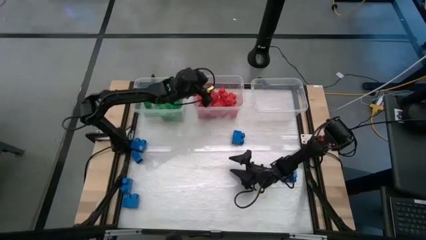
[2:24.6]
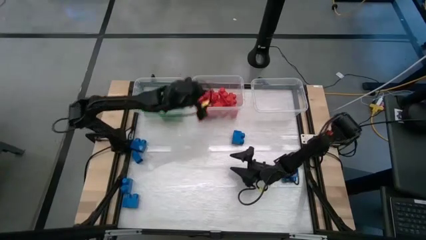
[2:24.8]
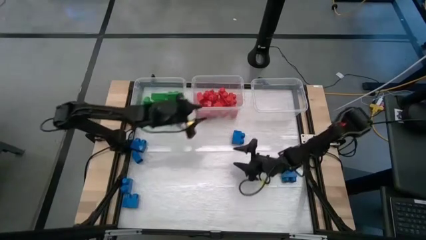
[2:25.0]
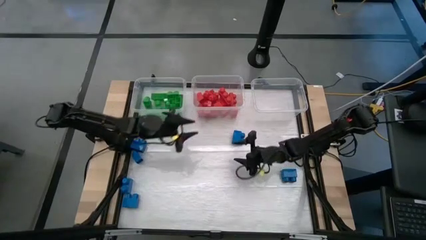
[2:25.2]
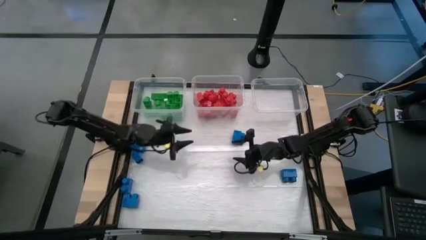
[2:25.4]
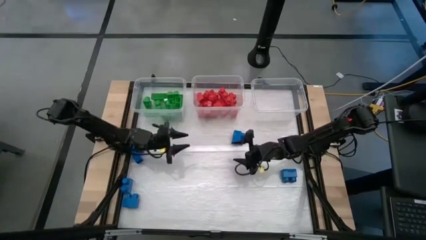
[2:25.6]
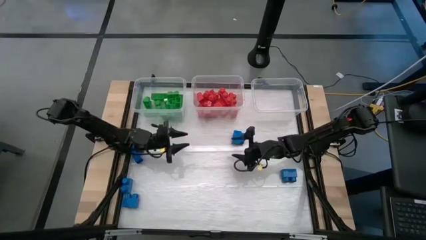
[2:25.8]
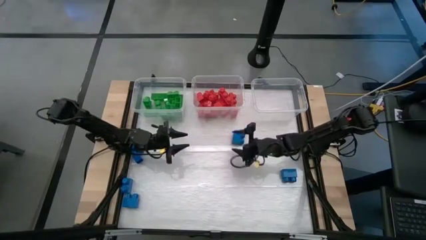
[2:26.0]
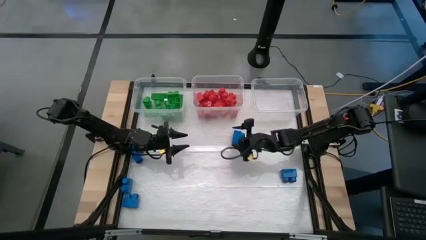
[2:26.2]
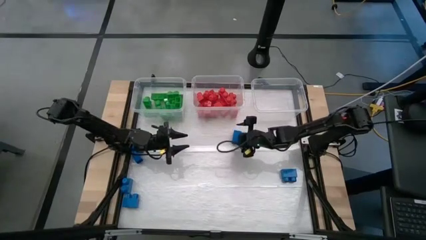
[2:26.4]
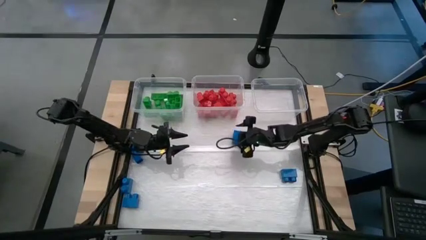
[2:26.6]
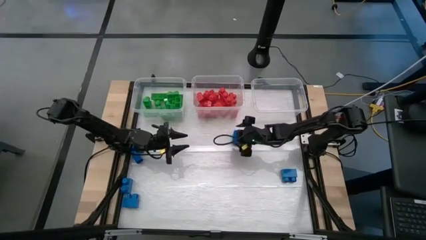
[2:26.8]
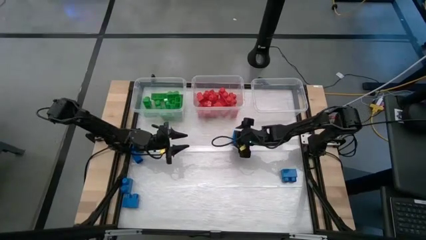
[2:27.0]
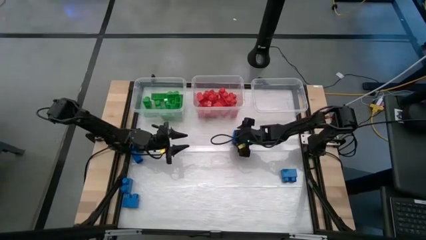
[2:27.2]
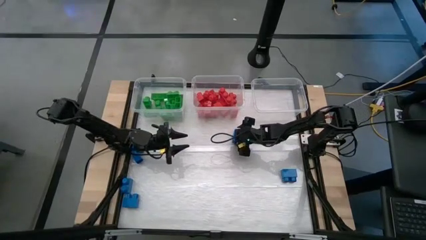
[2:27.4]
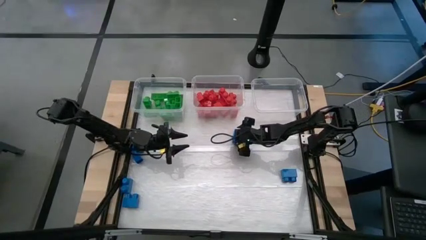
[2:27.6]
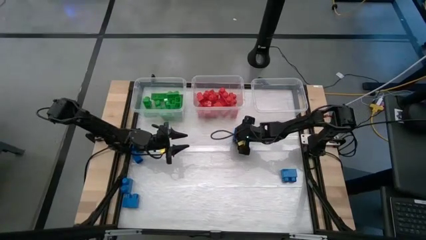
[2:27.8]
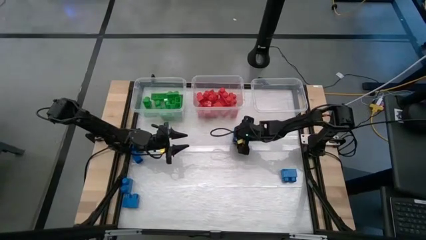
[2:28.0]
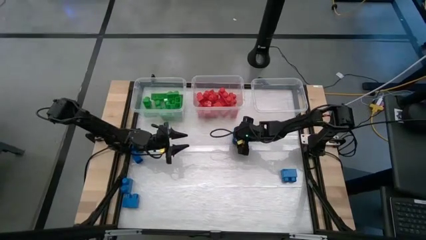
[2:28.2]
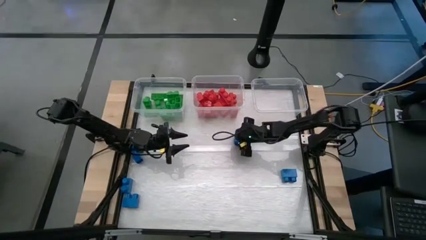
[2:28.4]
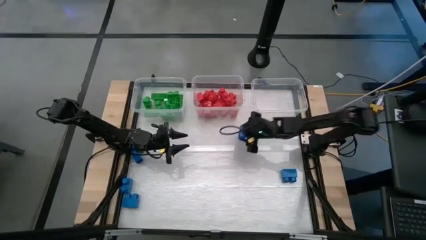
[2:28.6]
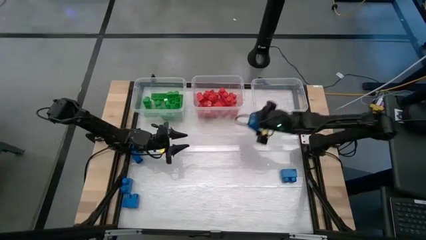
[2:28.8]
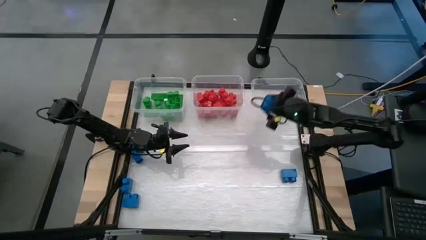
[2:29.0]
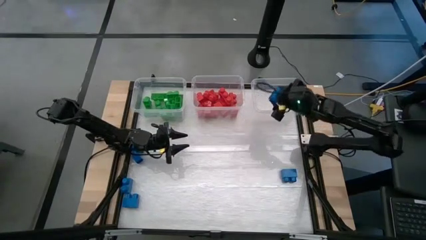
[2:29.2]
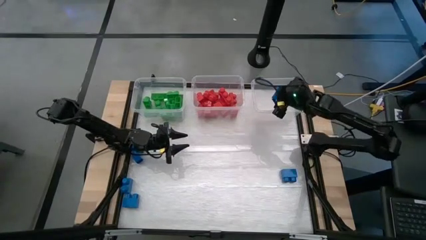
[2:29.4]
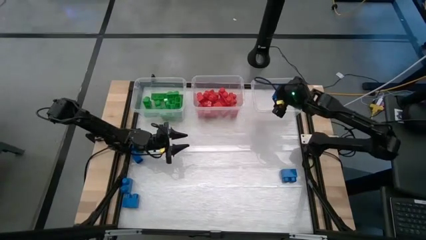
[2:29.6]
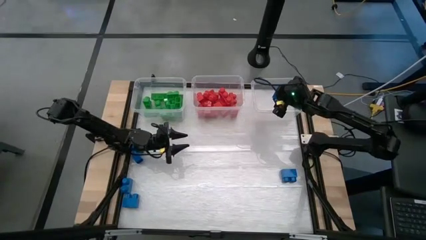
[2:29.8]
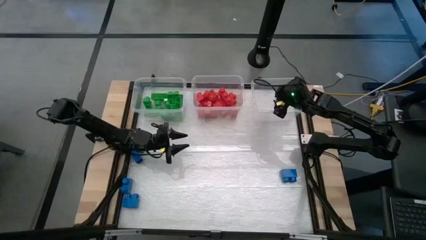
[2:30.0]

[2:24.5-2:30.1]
Task: Sort blocks
Put the blue game piece into the right transparent bin

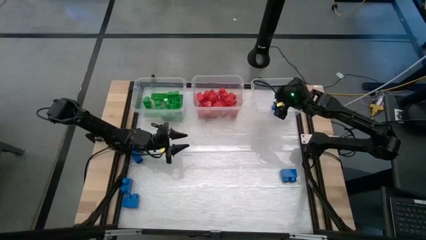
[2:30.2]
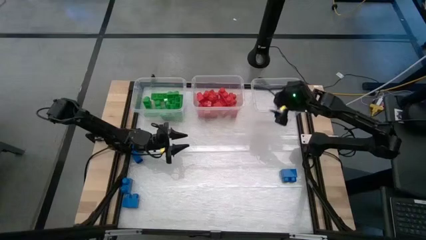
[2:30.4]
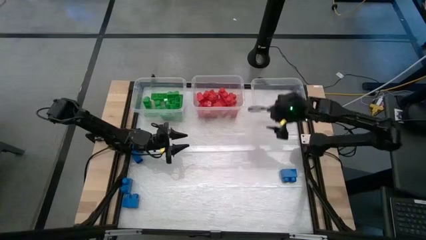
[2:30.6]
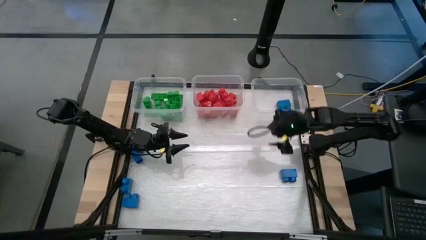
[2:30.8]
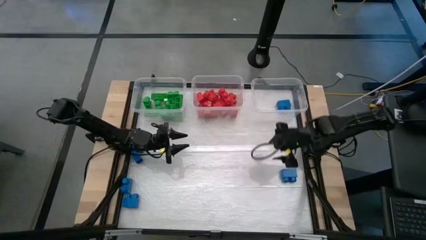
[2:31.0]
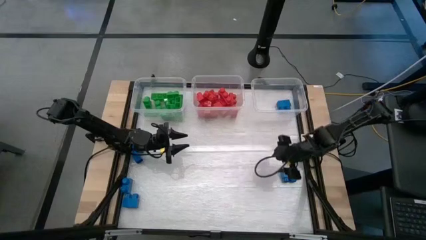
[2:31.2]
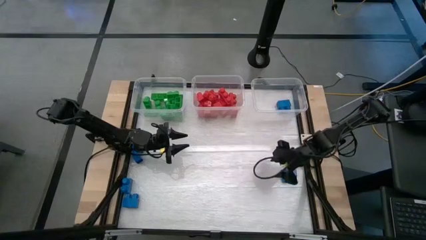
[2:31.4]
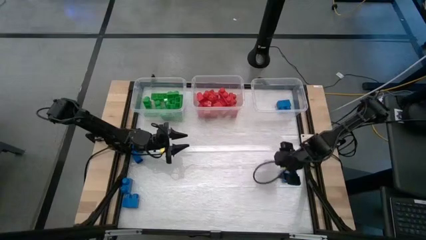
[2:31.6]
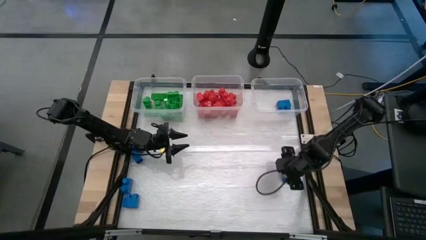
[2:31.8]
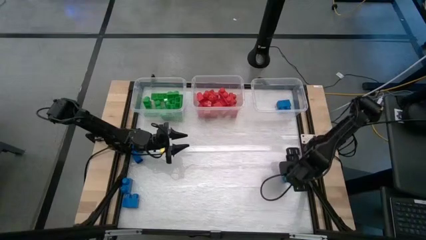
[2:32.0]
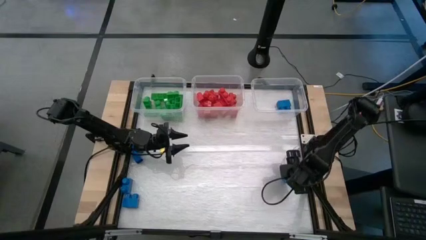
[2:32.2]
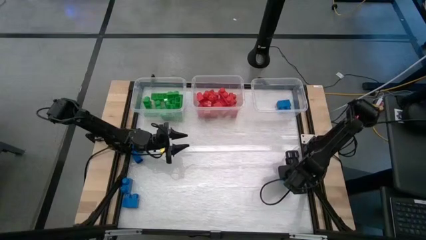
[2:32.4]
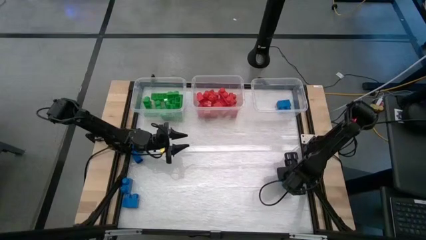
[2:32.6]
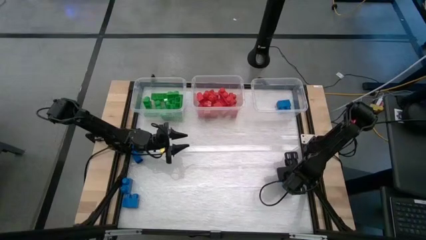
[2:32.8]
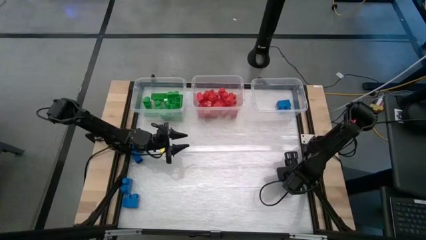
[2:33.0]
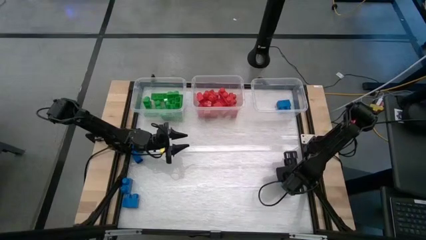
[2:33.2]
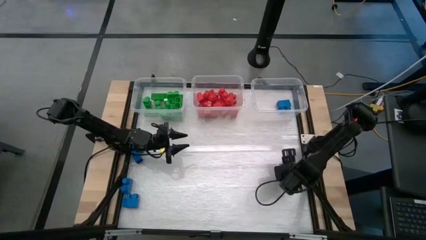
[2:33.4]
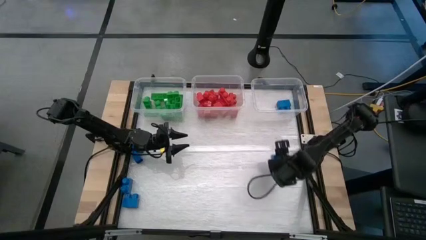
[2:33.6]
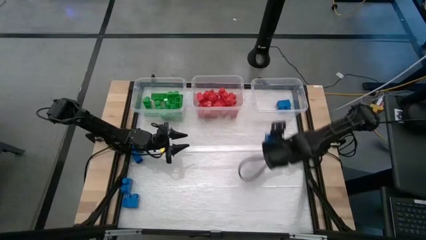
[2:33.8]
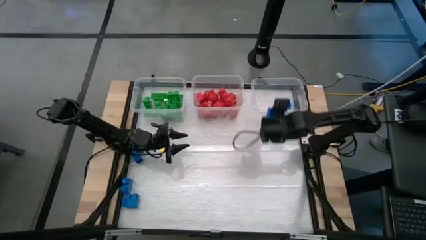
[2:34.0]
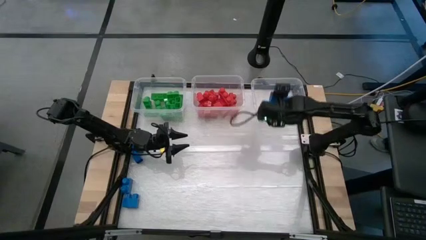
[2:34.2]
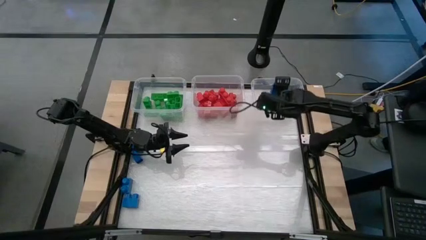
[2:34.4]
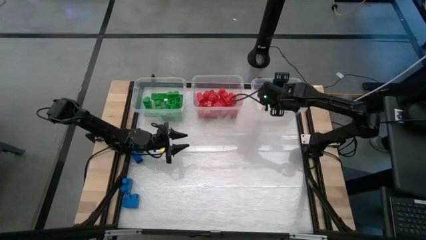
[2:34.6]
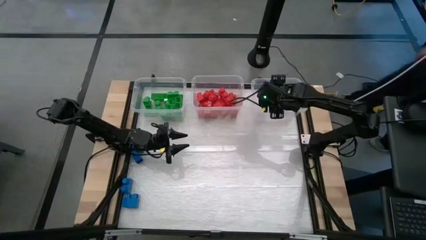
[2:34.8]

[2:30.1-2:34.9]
Put the blue game piece into the right transparent bin

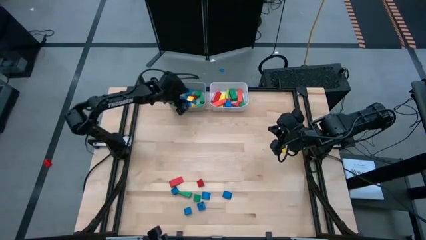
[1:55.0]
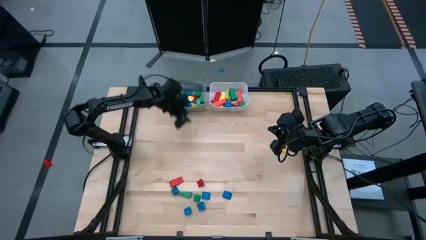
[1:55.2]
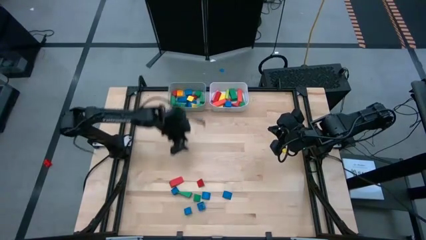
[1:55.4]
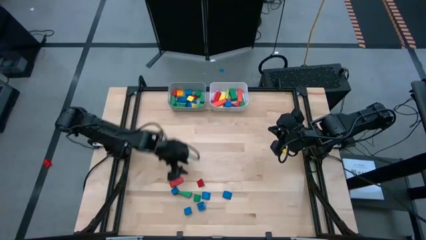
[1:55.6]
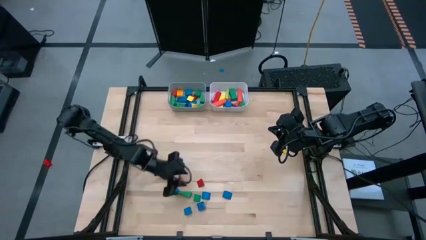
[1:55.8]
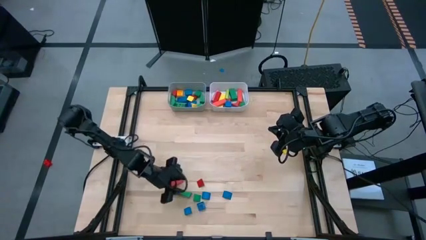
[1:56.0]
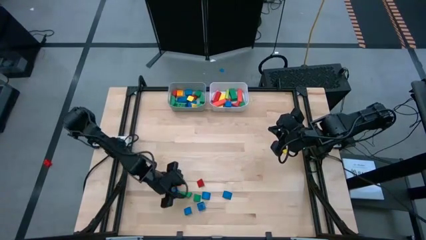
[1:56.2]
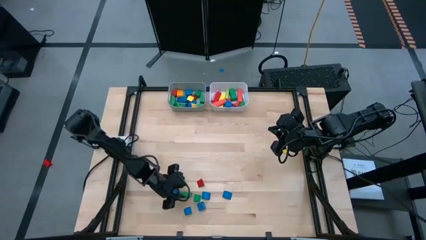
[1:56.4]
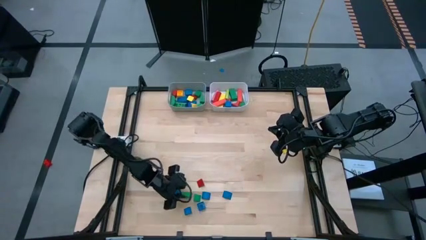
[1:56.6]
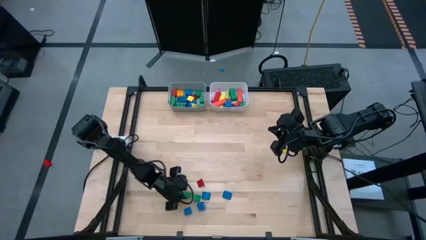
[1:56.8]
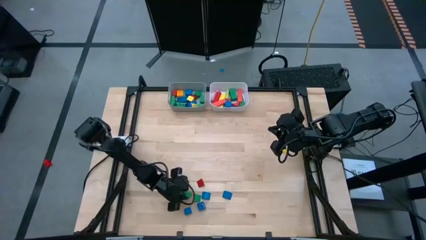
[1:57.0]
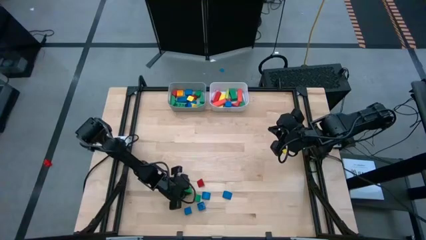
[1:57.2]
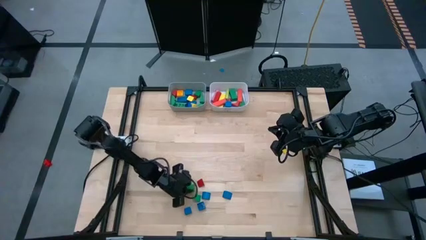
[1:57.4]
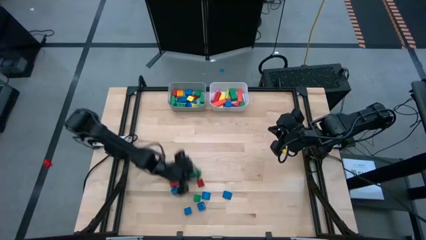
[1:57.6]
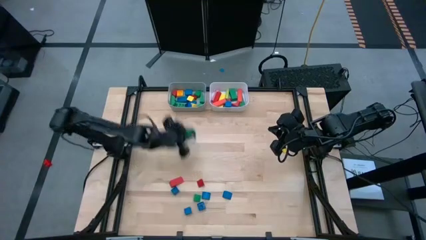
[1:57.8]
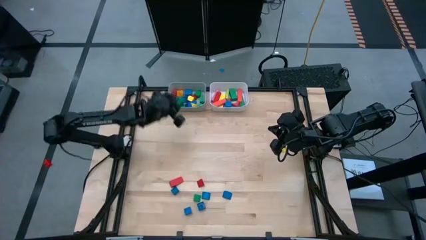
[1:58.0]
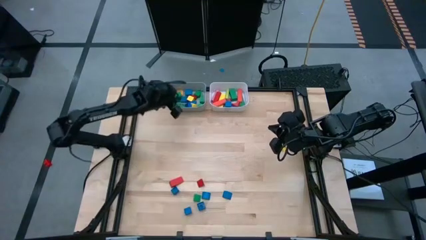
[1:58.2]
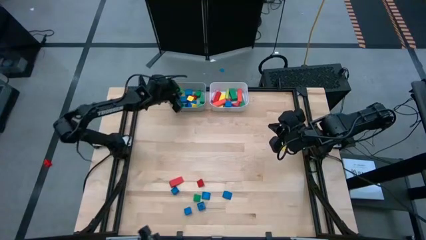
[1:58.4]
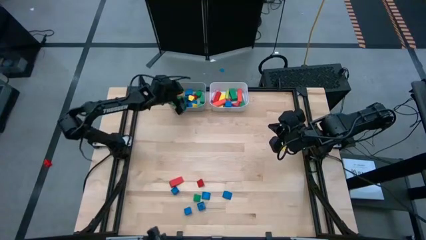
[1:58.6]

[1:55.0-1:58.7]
Task: Sort blocks by size
Put the green triangular block into the gray bin

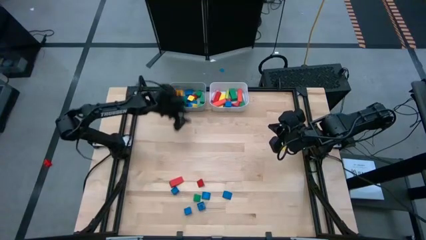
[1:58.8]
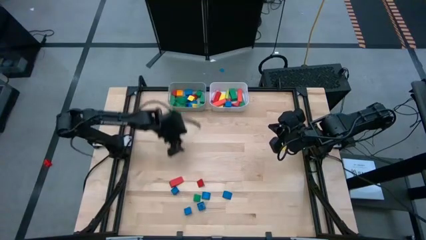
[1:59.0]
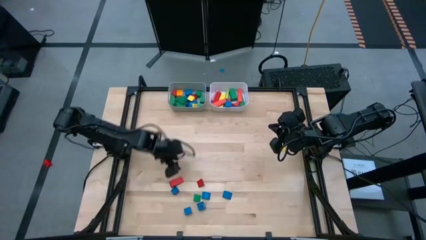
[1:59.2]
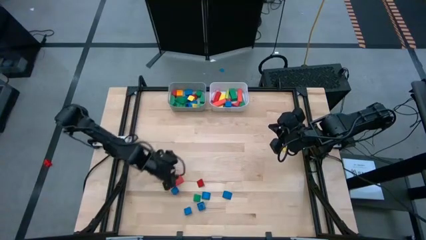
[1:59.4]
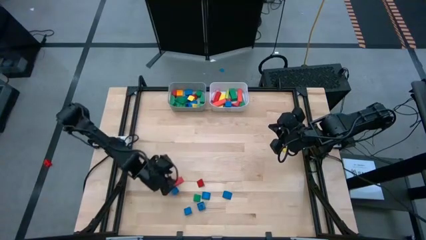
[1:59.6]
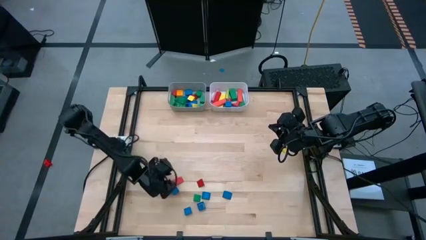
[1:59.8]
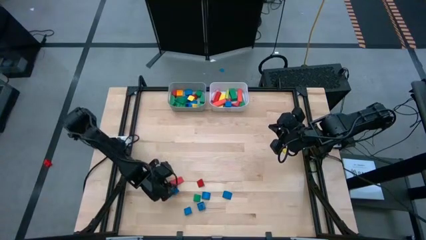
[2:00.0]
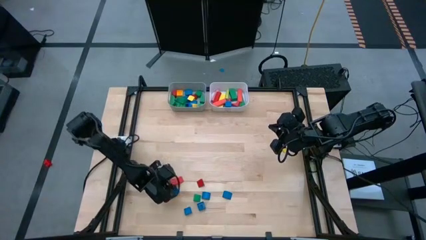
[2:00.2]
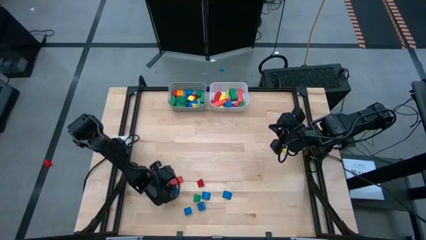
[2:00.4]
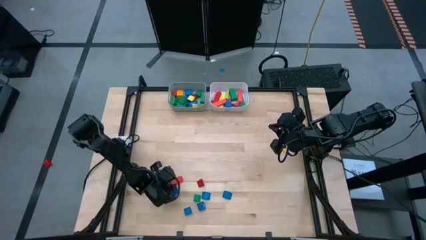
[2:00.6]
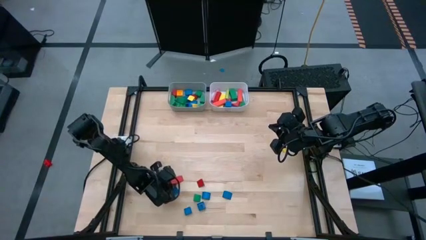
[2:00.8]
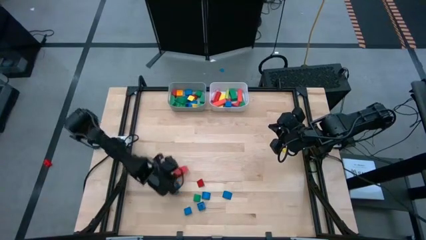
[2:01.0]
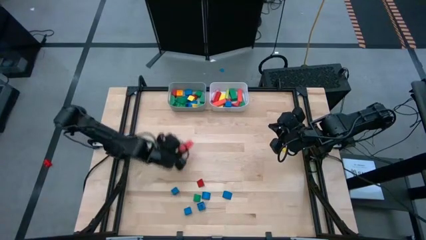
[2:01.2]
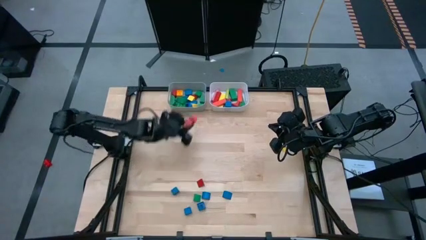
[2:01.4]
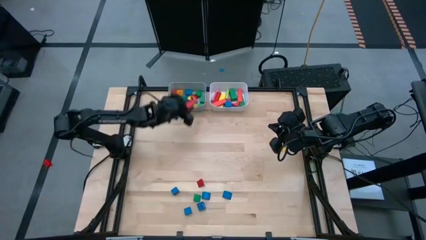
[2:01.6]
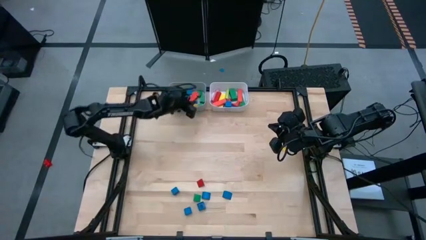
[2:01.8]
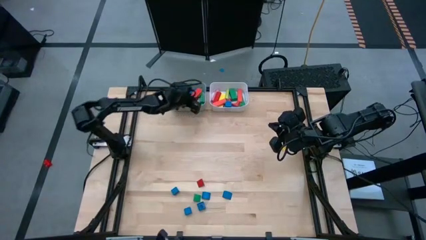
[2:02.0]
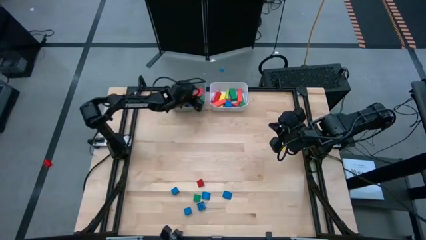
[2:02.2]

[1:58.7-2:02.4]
Put the red rectangle block into the gray bin
